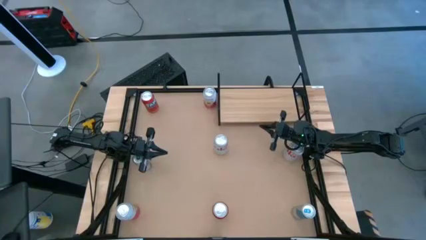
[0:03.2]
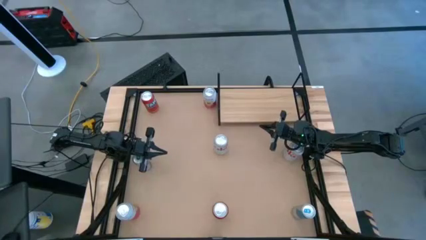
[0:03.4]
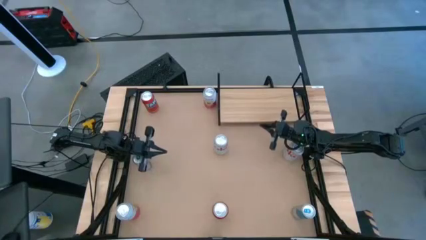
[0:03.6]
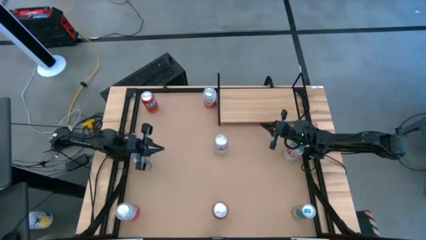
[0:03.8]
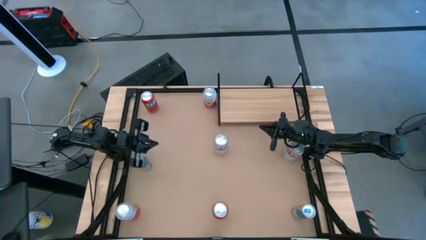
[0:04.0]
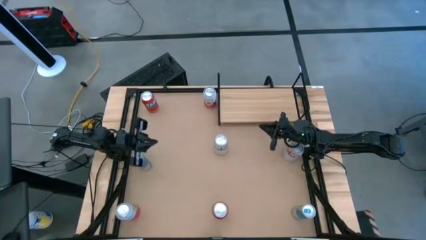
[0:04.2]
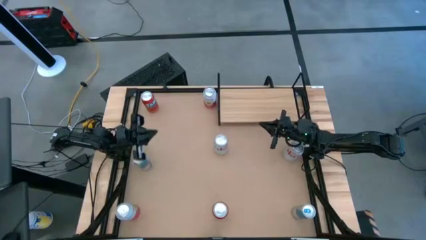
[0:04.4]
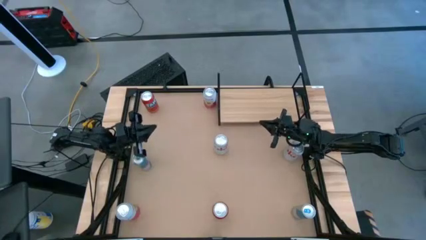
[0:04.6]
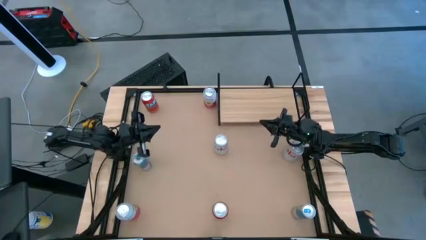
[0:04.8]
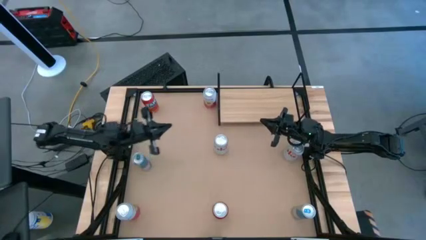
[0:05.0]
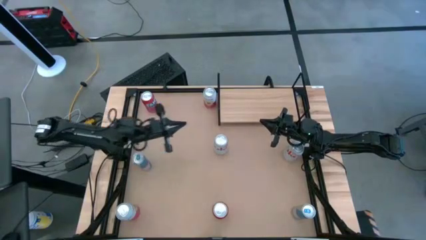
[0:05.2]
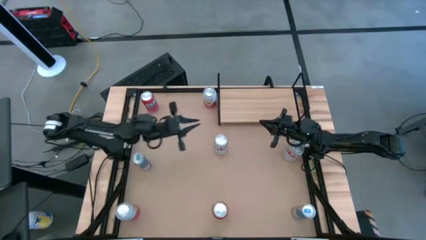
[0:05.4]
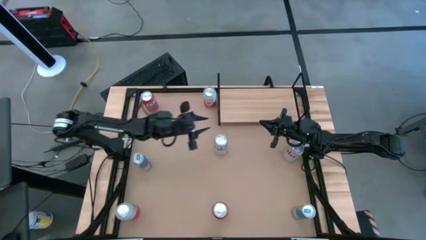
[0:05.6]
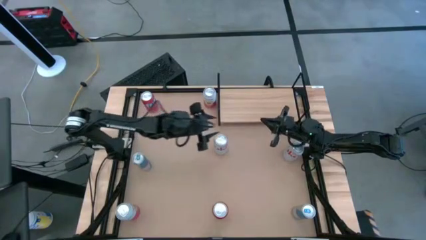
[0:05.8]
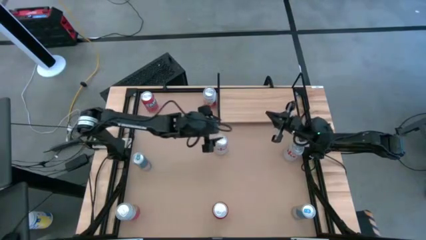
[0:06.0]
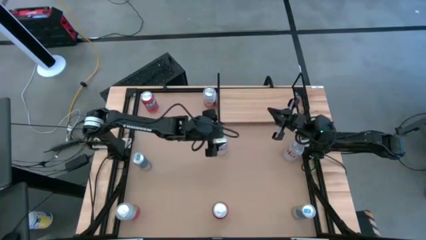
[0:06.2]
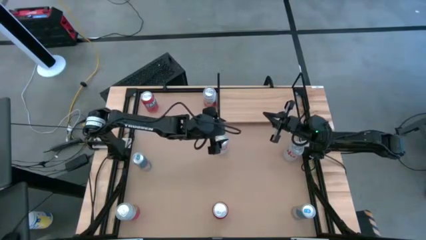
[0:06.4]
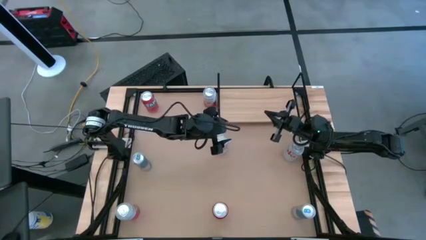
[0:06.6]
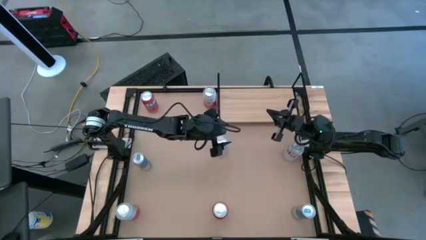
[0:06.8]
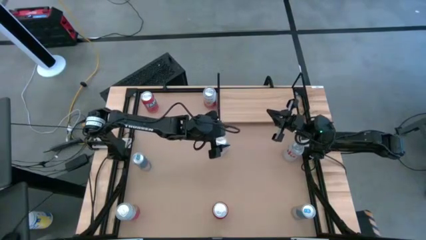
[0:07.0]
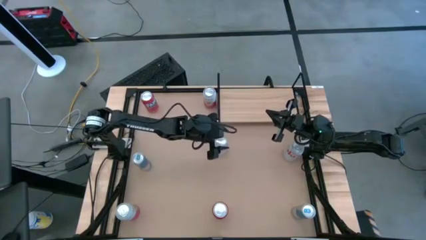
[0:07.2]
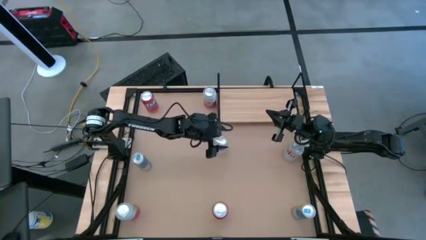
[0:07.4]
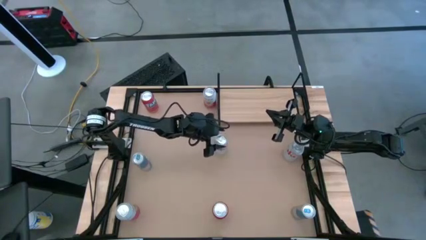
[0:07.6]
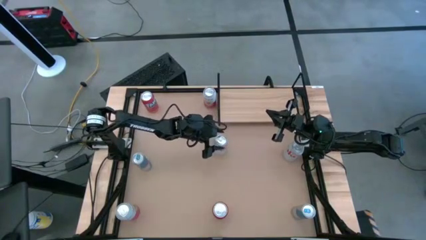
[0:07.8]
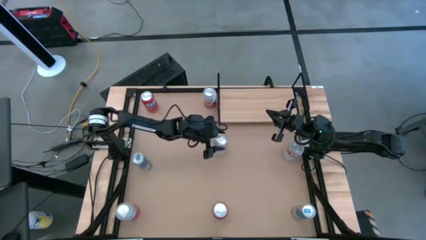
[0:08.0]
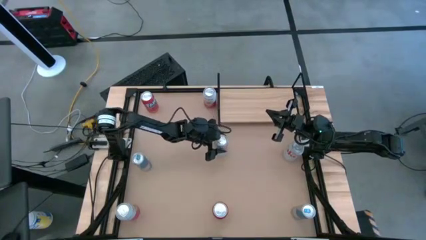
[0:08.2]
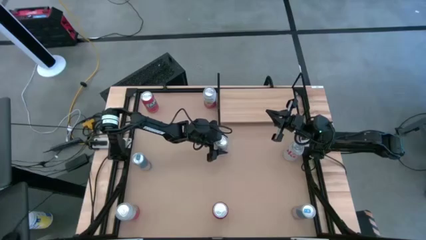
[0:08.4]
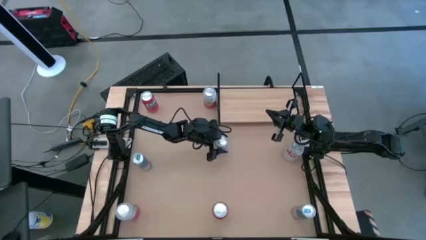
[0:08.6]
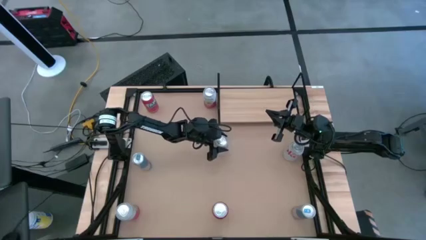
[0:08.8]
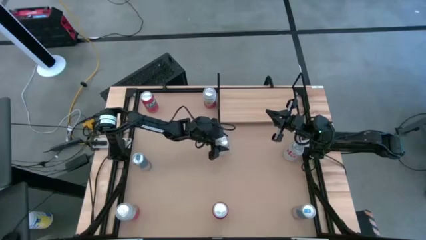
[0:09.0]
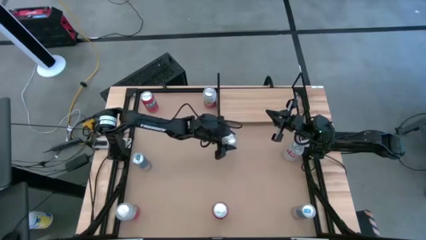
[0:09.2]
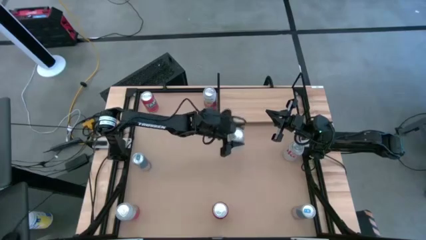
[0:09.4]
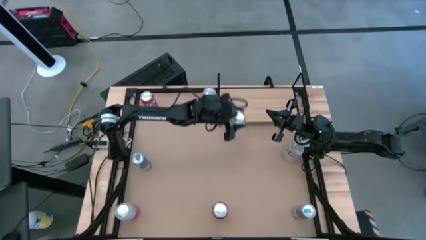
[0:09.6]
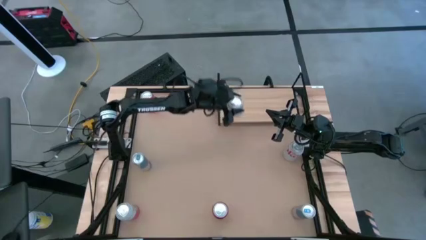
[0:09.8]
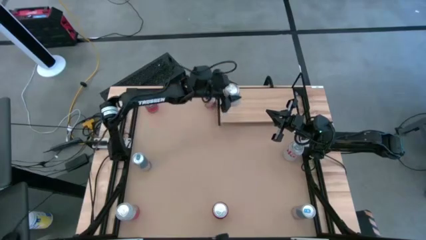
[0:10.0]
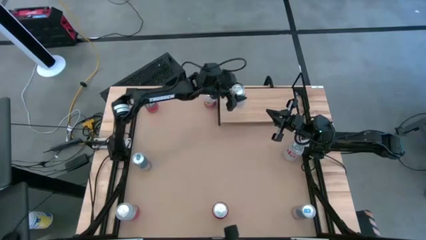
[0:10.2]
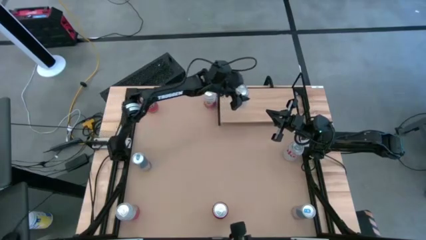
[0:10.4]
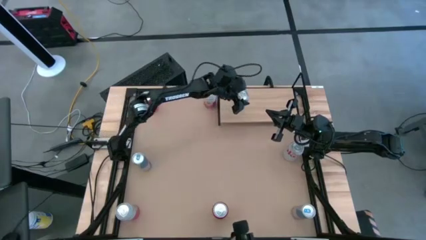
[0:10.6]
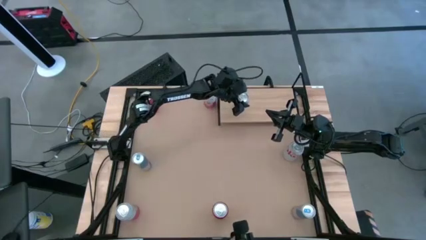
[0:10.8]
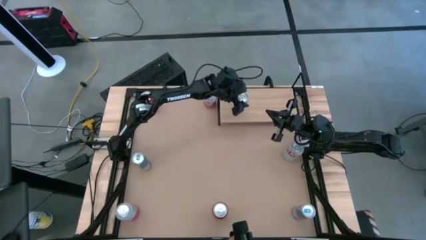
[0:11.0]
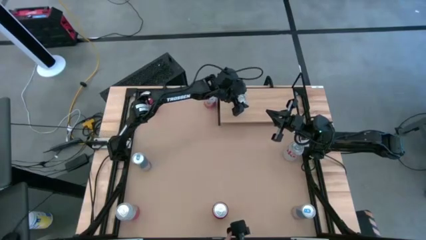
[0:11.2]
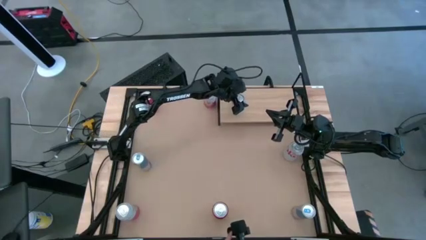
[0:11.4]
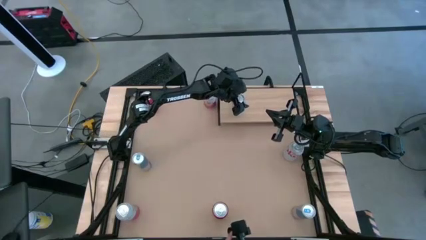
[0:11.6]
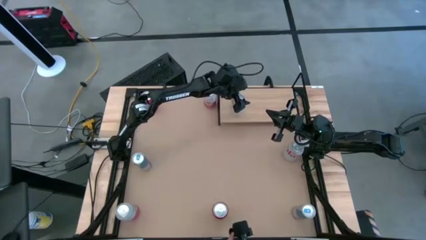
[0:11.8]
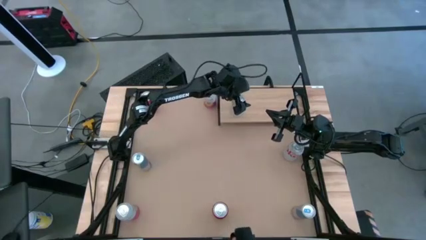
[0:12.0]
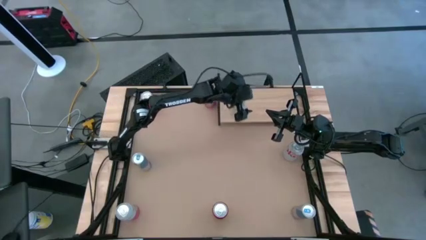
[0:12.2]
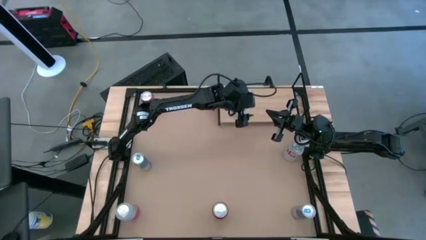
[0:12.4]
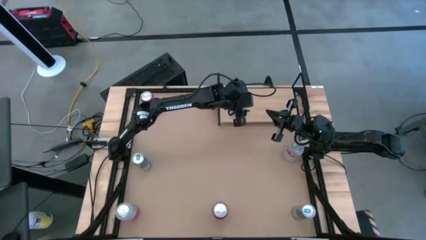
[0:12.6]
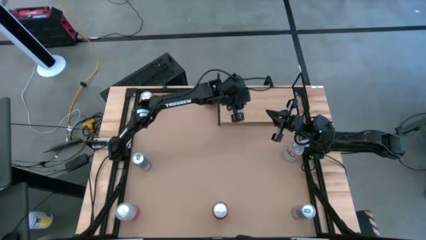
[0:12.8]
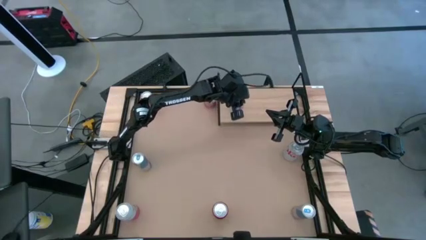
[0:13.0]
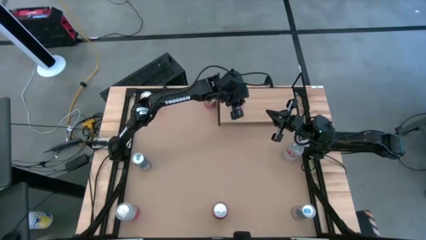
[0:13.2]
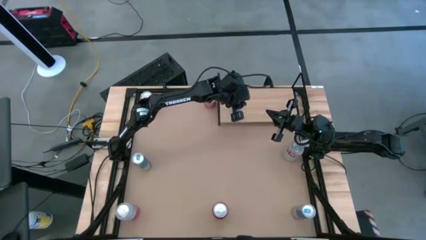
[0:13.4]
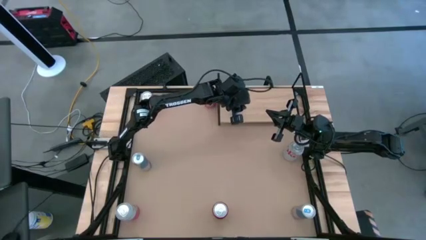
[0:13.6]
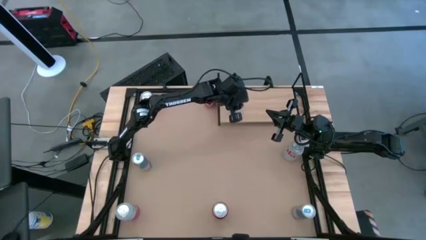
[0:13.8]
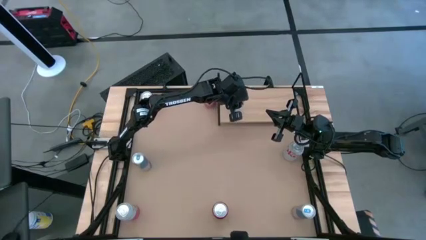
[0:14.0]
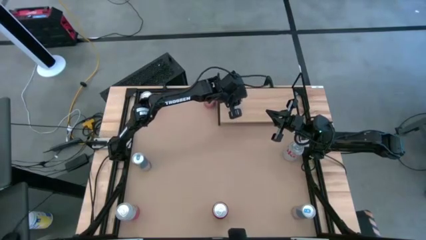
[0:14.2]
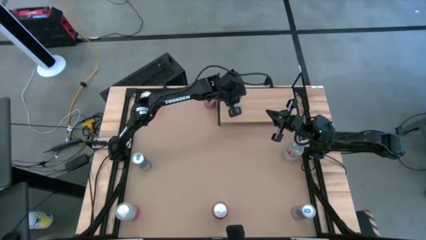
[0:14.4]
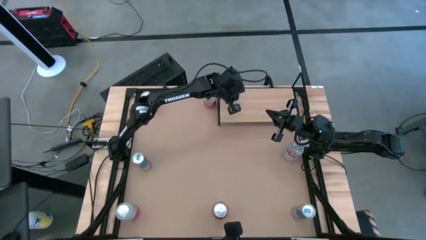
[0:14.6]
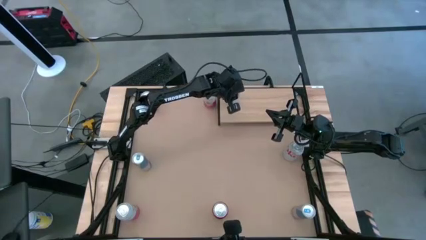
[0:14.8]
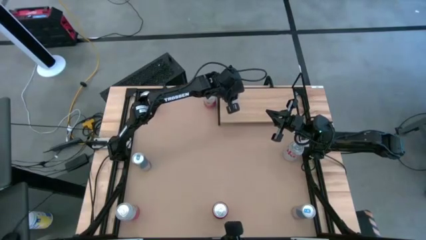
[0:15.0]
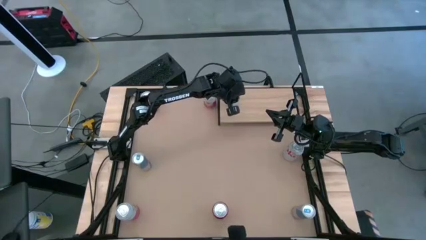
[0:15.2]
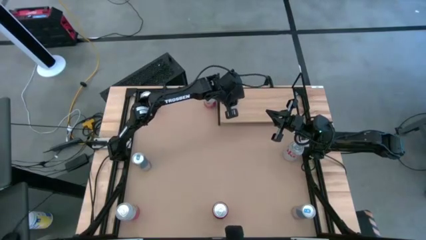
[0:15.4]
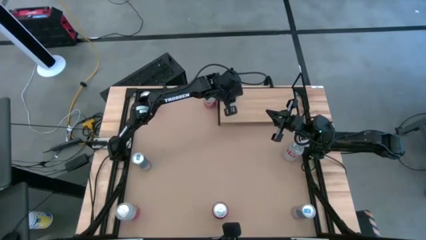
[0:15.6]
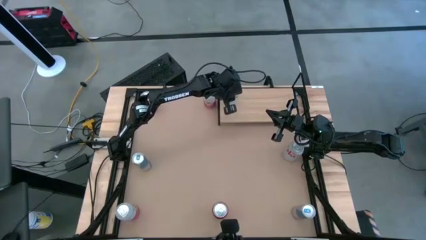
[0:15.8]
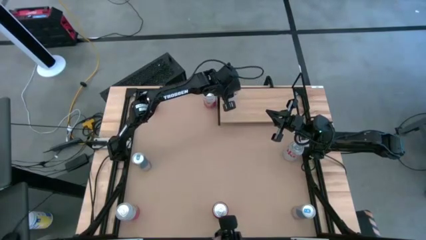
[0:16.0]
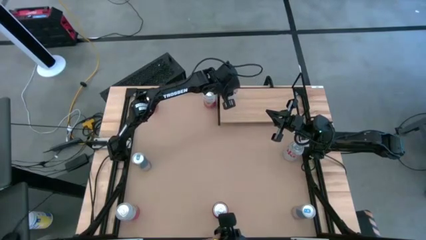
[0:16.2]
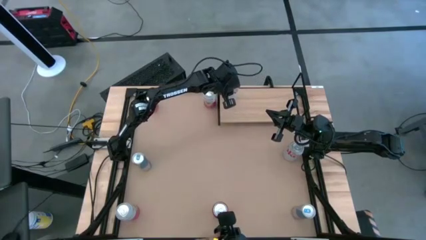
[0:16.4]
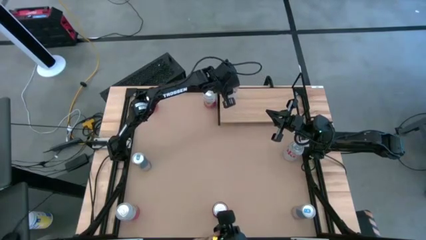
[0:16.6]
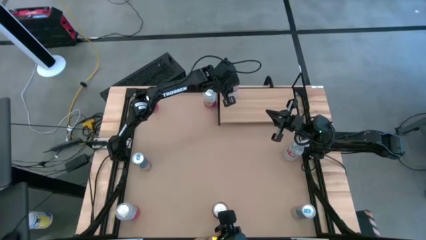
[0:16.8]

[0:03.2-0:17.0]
Task: Place canned beverage on shelf
Put the left red-silver soda can on the shelf

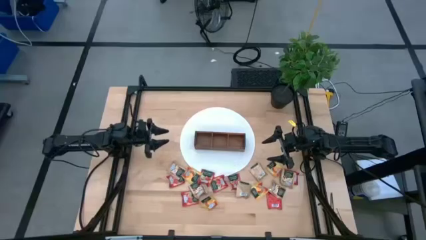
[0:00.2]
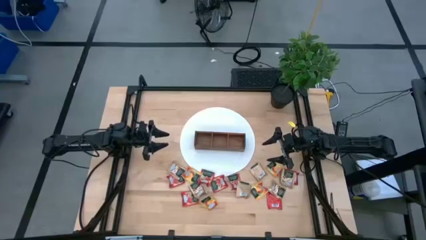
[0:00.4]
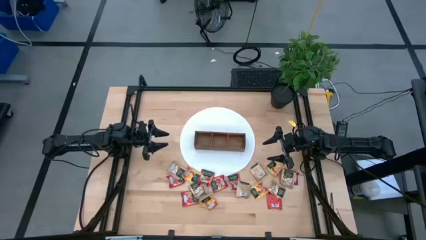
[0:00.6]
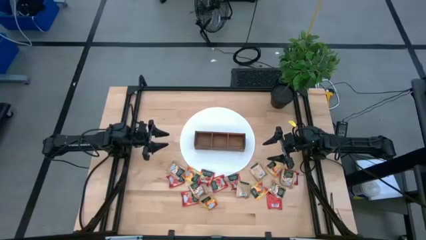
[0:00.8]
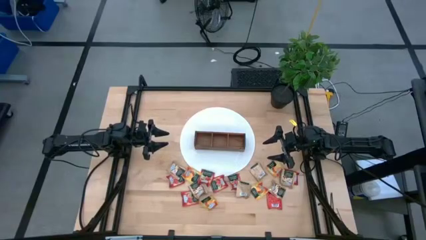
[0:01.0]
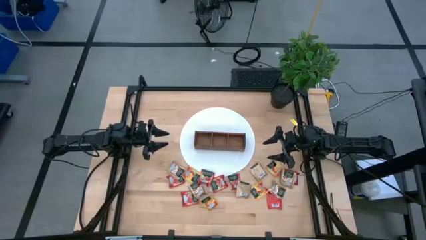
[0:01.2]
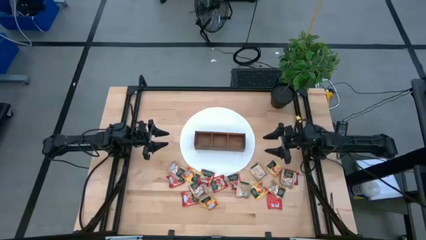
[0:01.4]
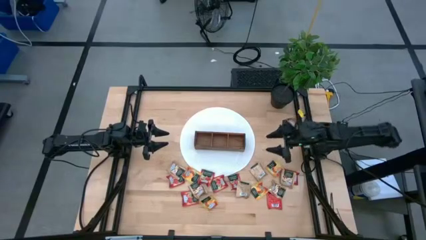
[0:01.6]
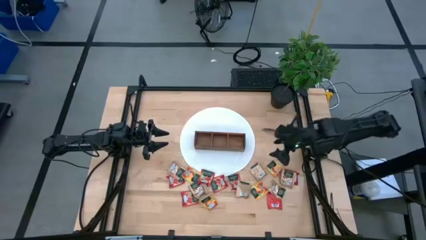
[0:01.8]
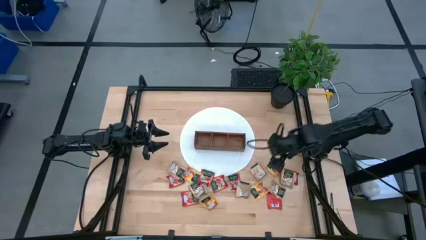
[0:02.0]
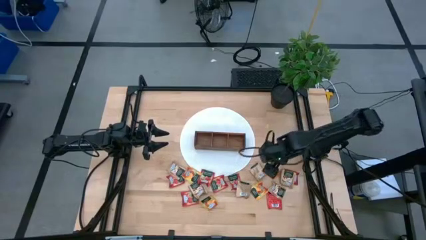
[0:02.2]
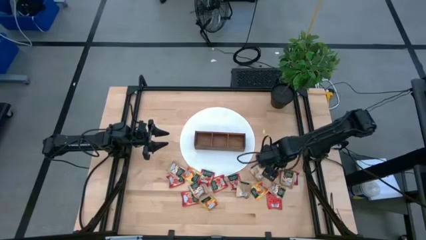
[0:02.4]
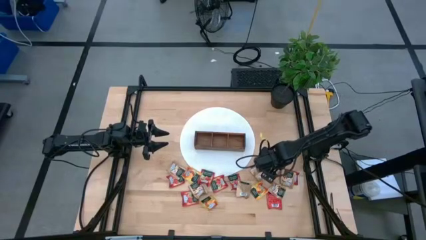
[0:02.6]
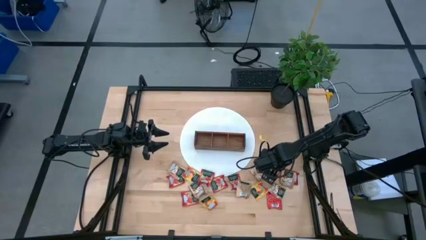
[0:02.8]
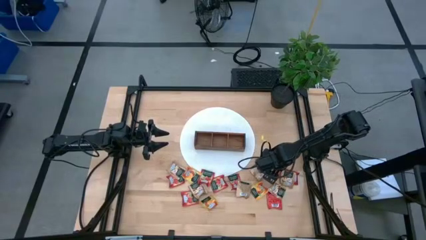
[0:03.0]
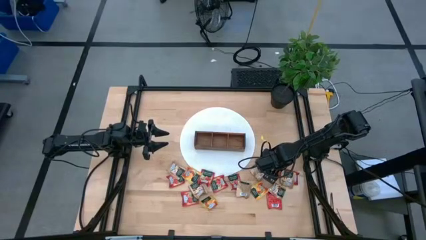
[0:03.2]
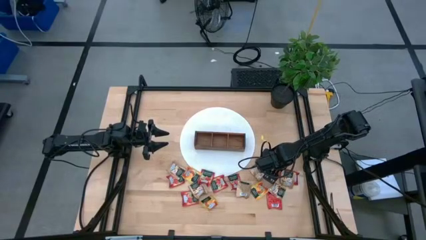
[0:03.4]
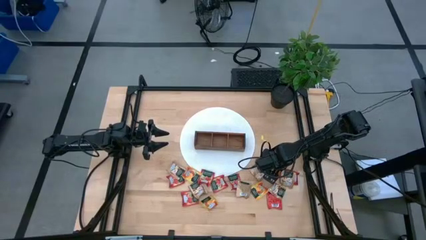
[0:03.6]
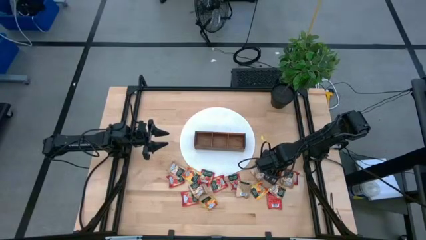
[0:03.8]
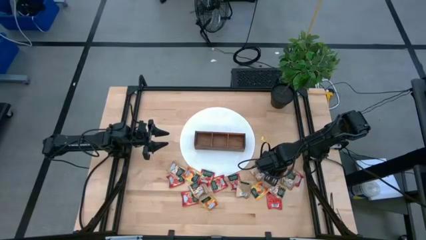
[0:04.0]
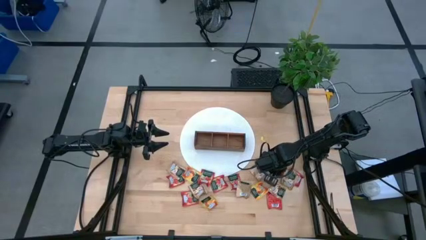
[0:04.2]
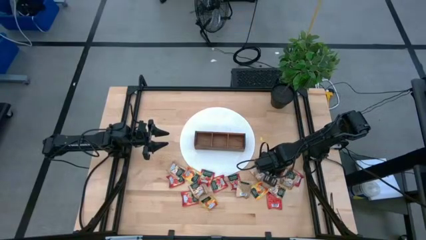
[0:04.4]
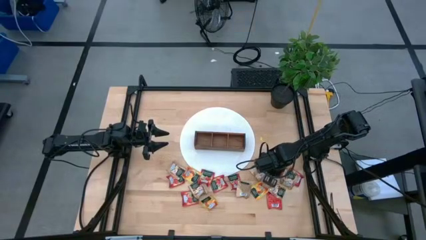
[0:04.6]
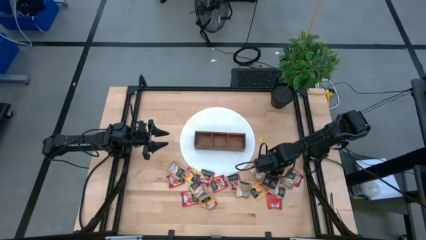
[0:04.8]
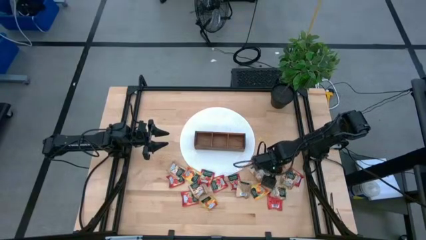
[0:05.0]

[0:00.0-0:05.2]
Task: Pick & Place Tea
Put the yellow tea bag into the right section of the wooden organizer
